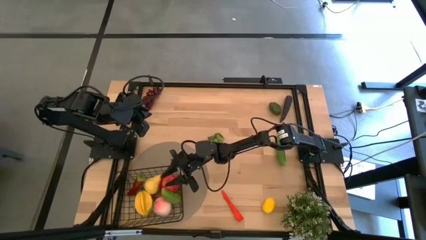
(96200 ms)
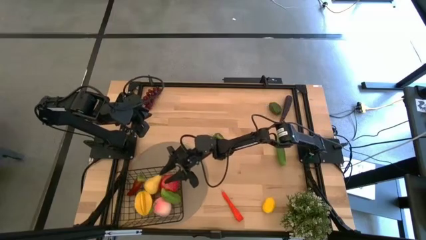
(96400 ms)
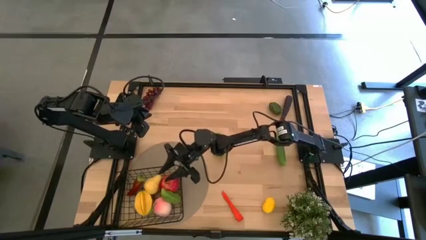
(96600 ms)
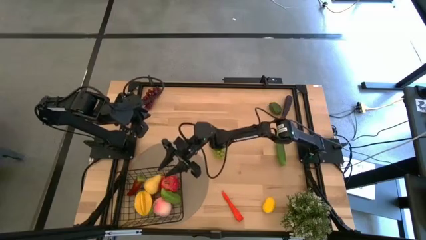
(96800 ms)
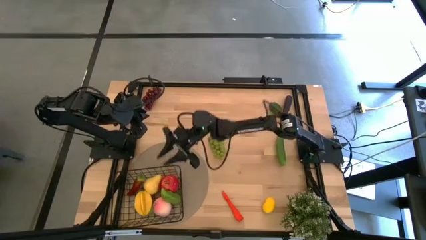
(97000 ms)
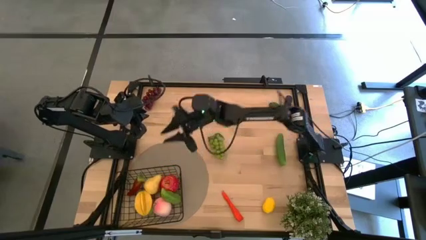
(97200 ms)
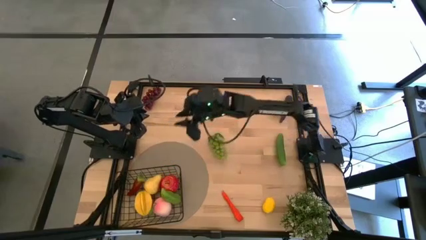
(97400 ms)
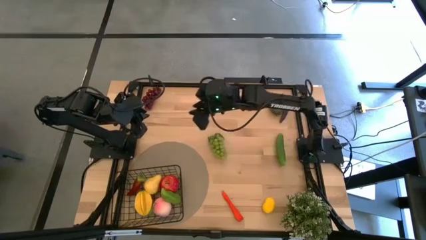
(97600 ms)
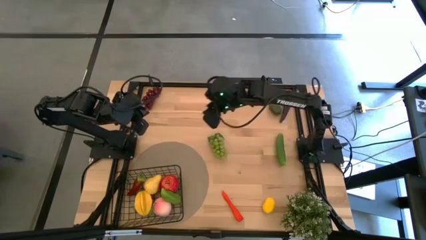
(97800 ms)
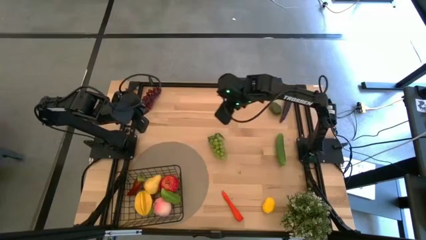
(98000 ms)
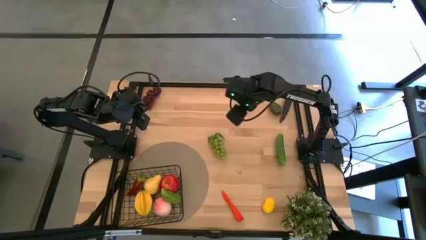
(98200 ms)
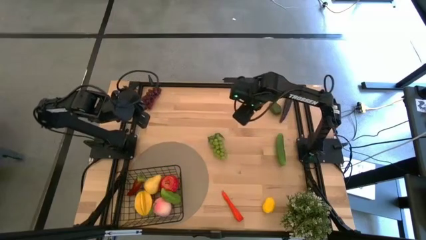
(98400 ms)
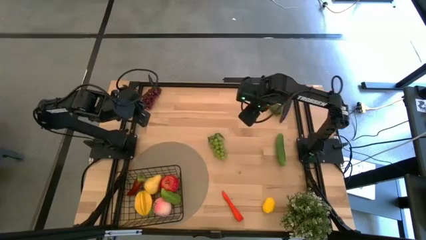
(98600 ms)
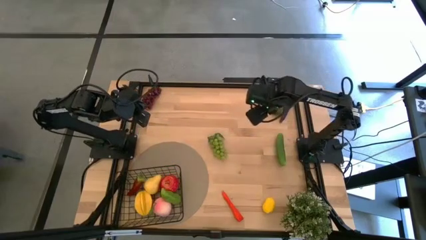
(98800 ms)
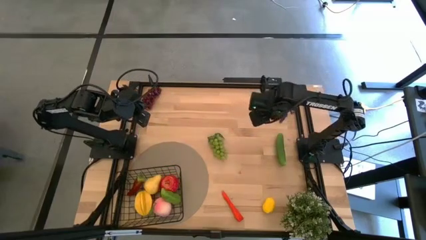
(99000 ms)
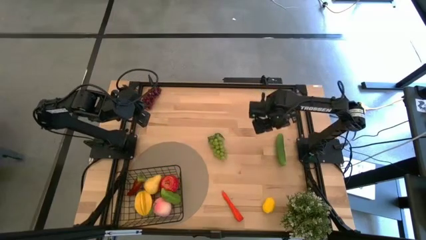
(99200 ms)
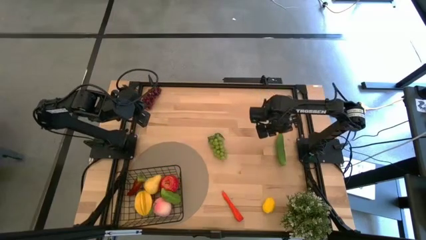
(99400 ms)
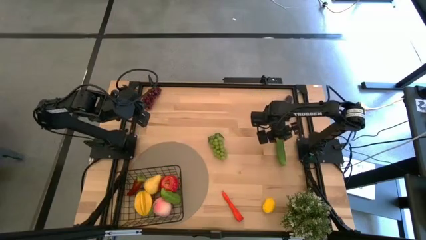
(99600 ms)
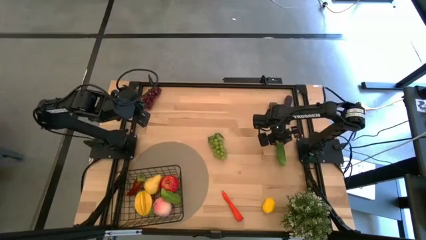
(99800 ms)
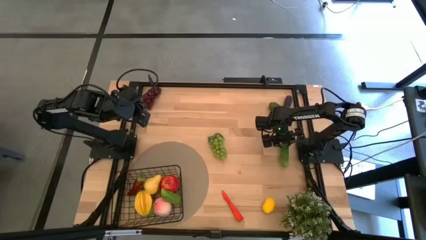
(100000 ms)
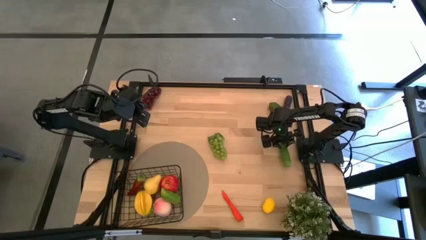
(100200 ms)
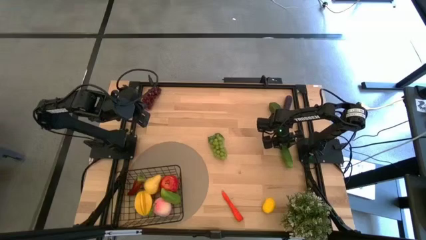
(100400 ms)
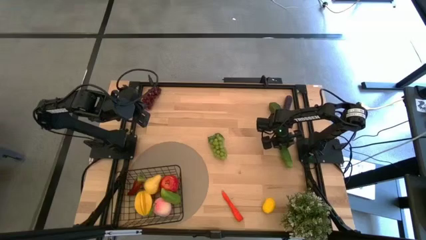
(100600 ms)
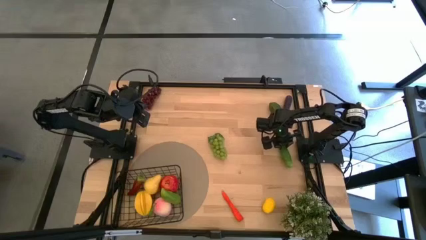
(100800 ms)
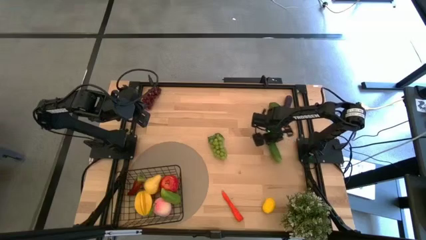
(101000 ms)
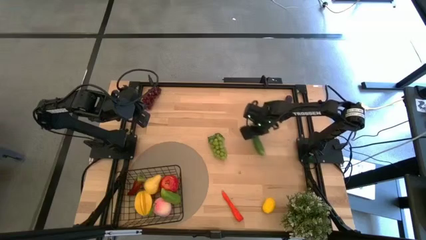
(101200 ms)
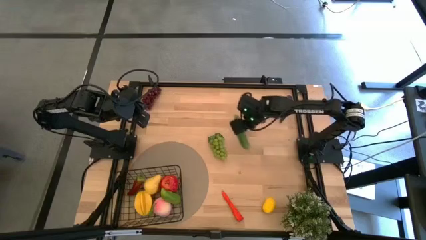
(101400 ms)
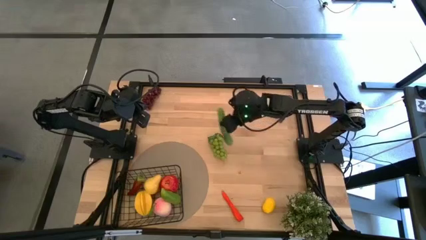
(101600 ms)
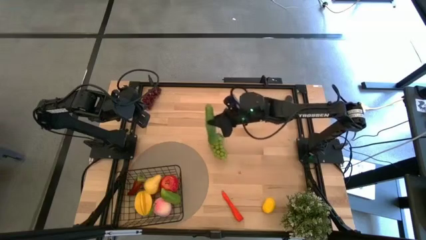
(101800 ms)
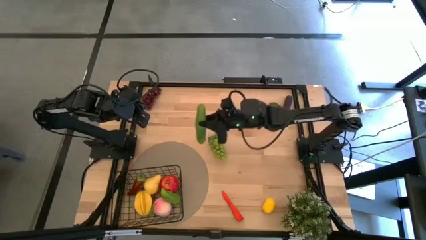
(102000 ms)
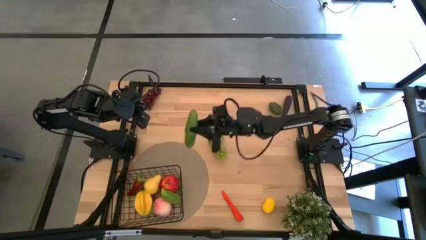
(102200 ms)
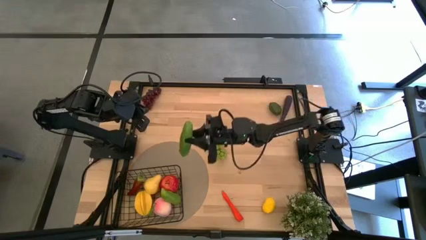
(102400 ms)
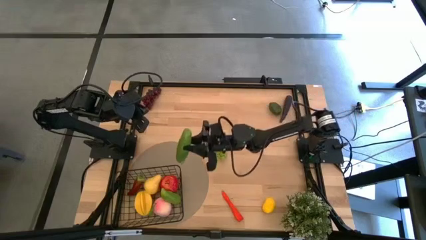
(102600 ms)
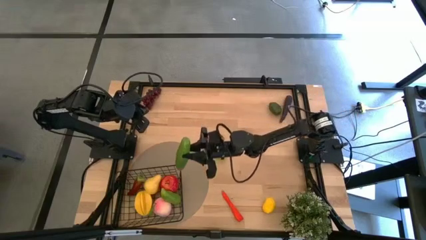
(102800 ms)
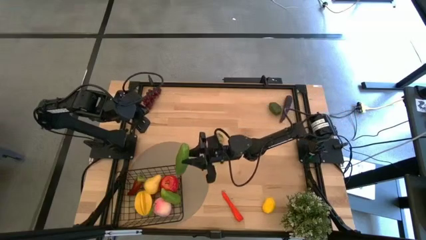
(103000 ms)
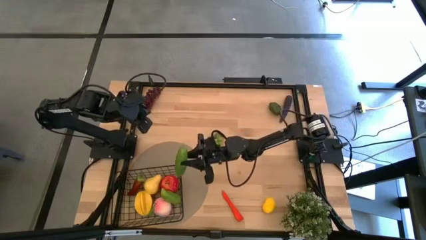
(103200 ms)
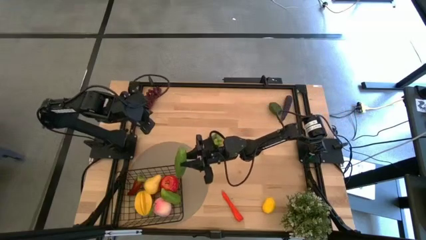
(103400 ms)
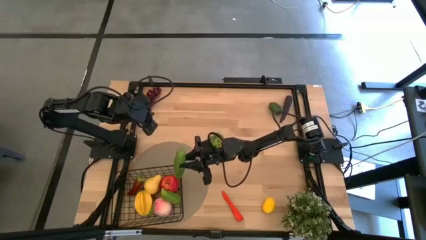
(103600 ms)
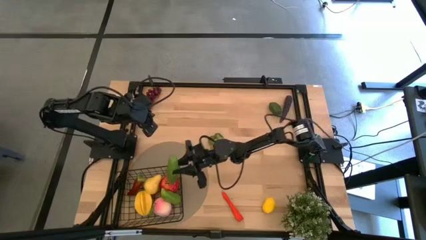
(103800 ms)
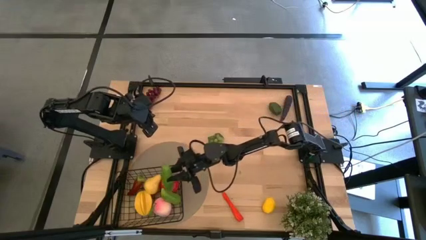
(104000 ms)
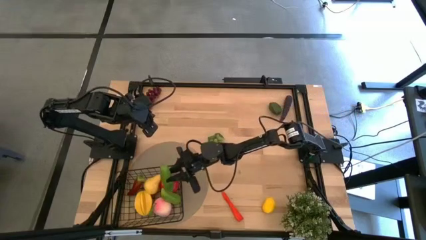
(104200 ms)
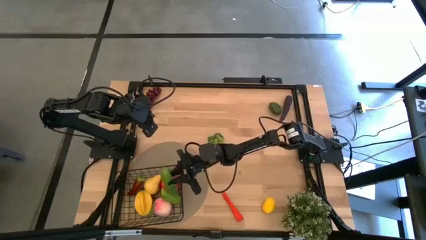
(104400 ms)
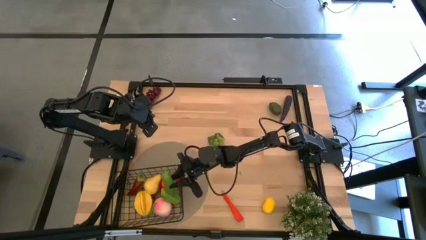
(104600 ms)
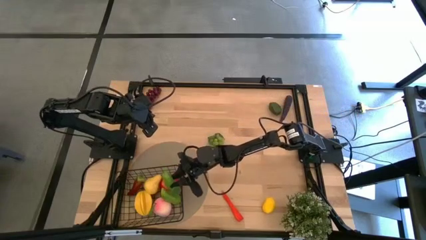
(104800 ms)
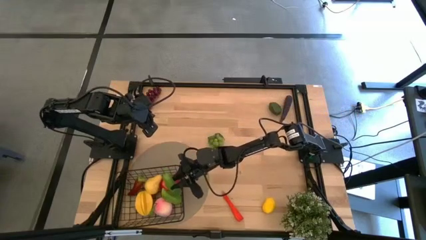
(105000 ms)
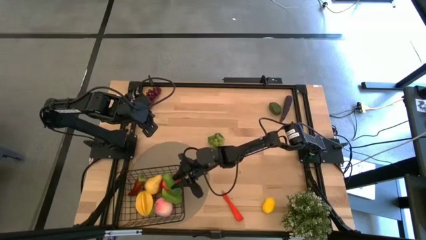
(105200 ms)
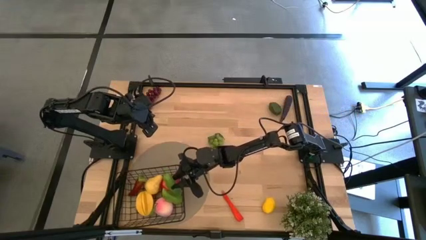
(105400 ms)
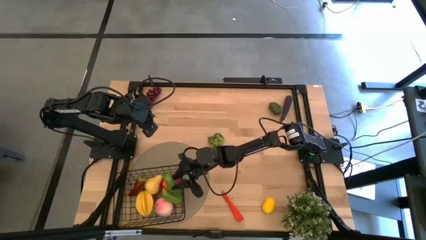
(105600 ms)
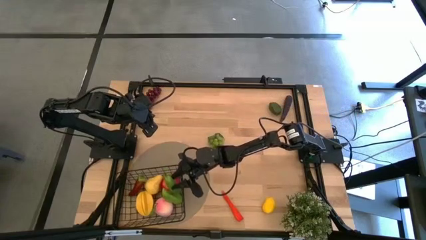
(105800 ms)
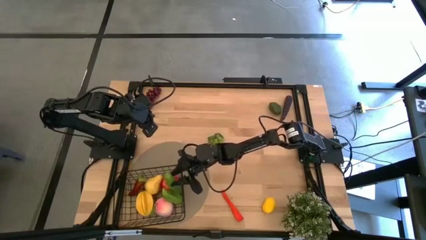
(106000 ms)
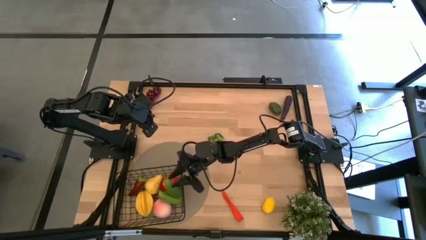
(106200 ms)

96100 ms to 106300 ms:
Task: Build produce basket
Put the green cucumber into the wire basket

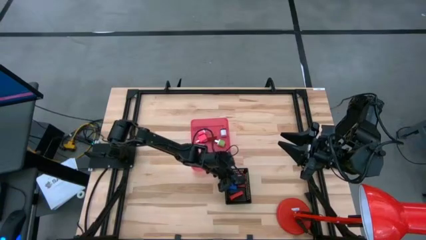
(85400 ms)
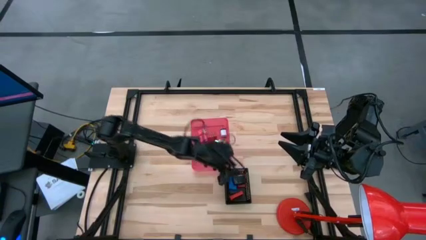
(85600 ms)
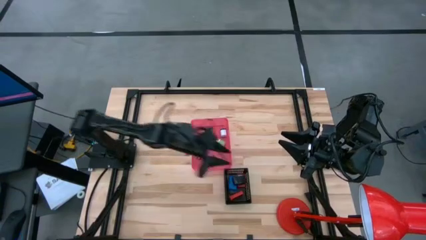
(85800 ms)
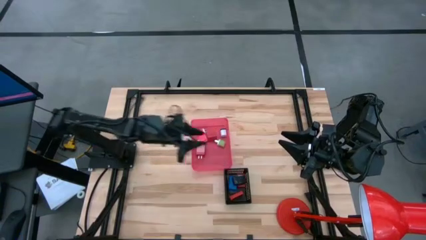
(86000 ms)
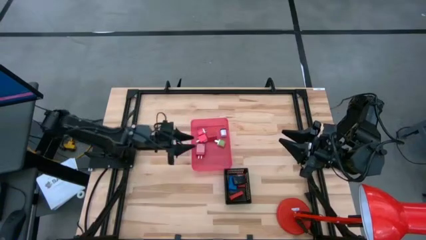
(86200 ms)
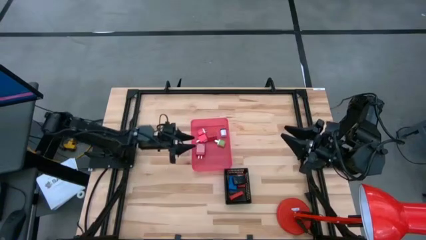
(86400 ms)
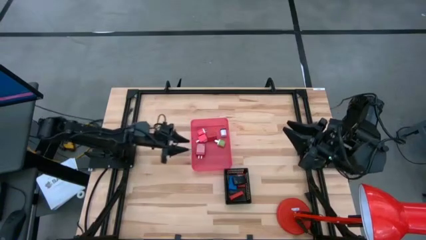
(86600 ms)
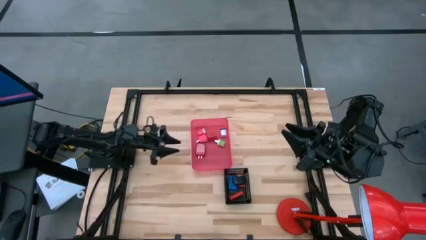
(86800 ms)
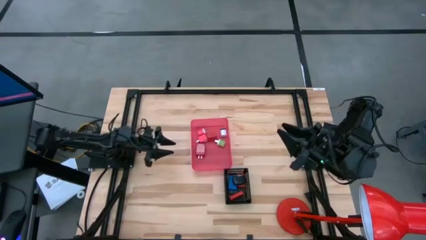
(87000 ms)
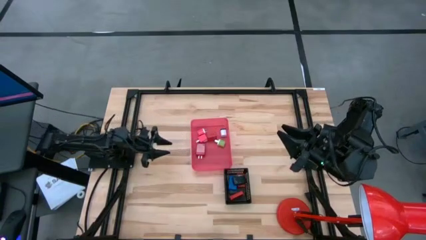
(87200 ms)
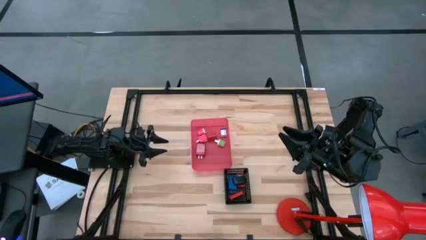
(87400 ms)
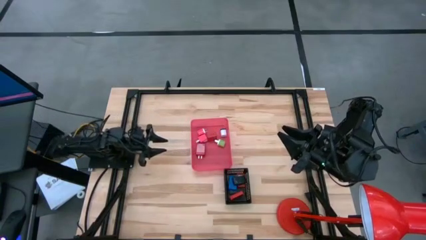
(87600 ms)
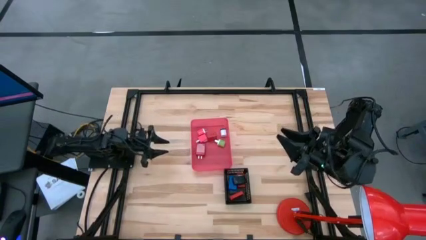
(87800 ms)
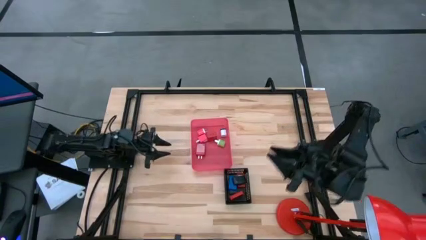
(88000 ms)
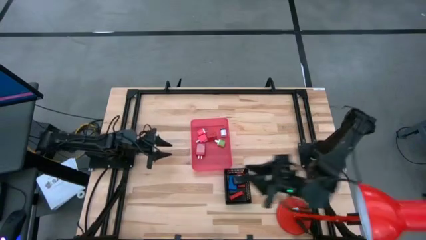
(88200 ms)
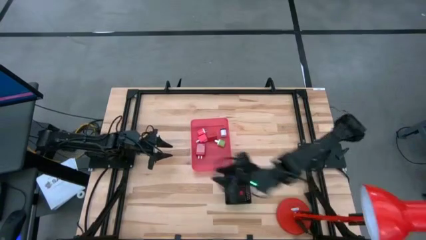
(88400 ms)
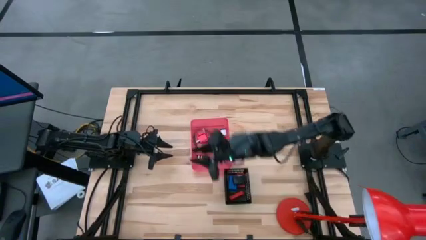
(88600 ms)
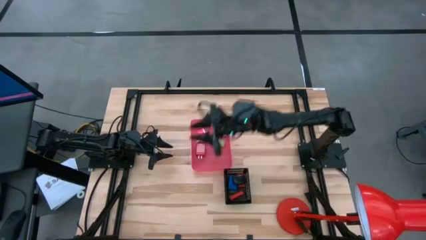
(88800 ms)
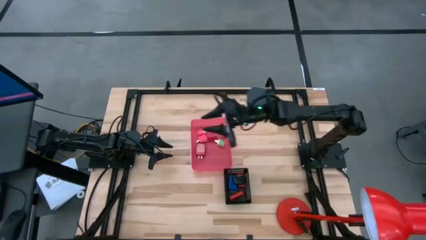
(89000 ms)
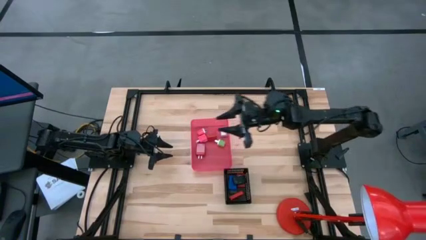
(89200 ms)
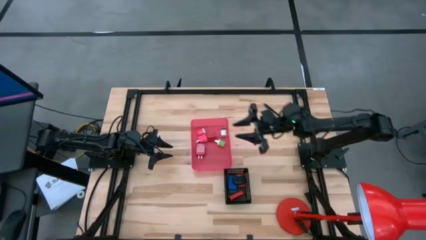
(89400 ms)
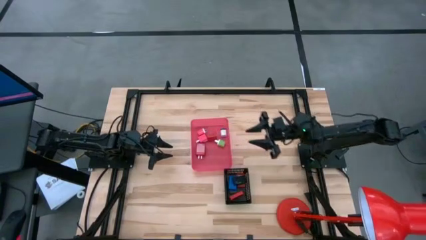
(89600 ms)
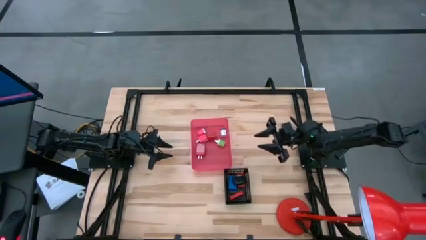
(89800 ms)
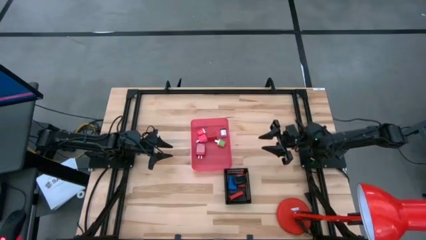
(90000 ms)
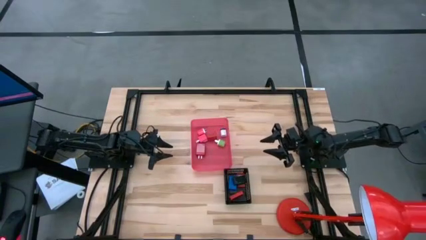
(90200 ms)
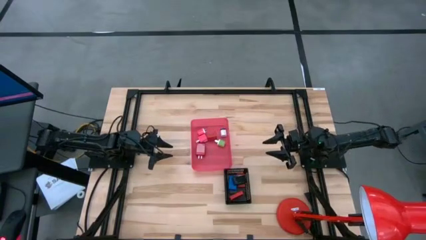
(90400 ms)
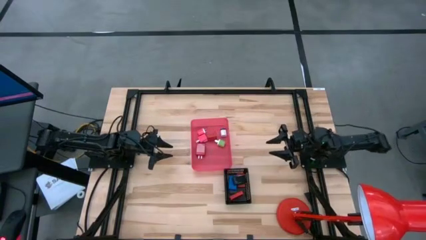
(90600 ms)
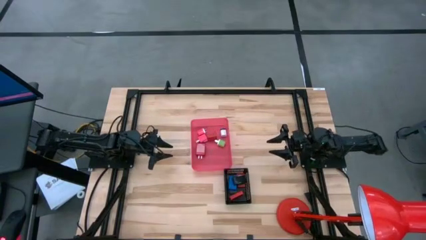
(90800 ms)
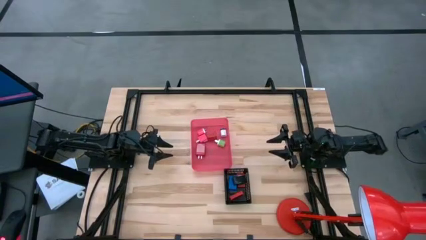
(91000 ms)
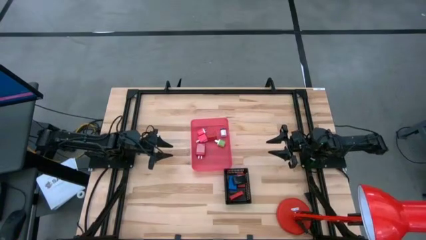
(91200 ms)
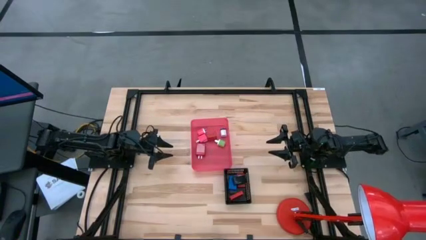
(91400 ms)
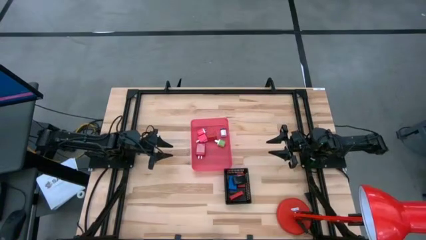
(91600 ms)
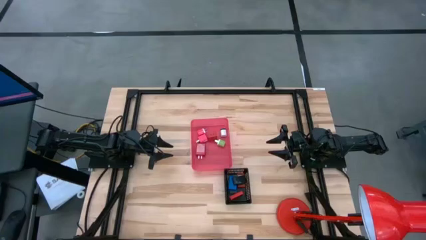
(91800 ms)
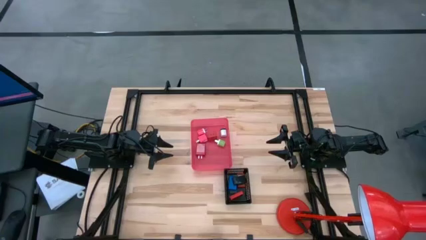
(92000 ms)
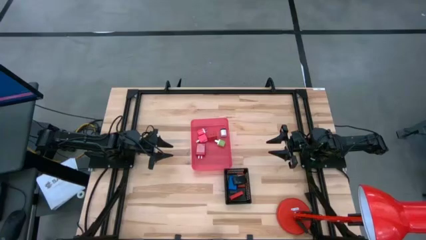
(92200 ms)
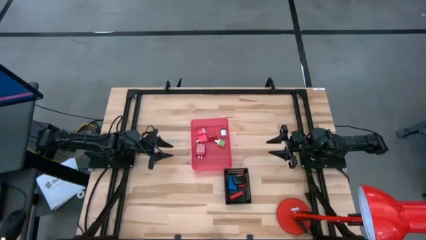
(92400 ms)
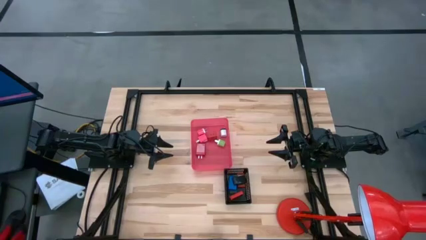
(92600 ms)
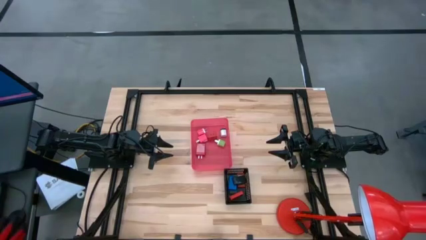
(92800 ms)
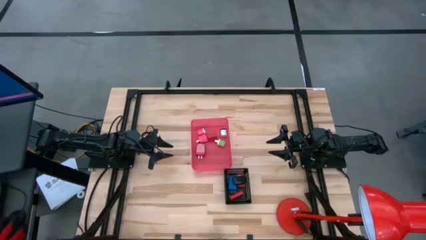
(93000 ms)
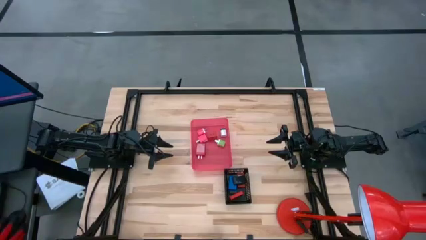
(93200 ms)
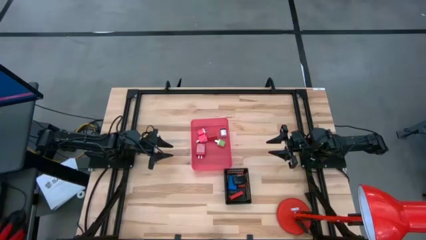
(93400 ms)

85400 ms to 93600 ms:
Task: Pick & Place Office items
Return to Home Position
